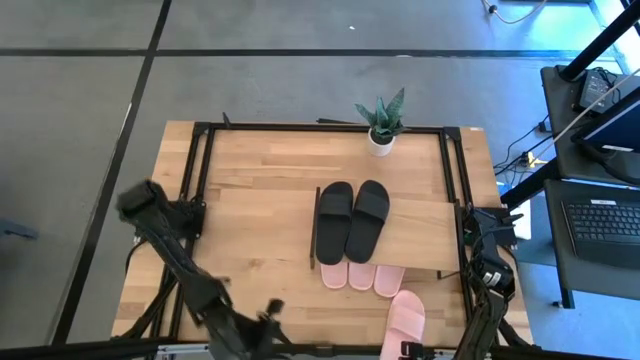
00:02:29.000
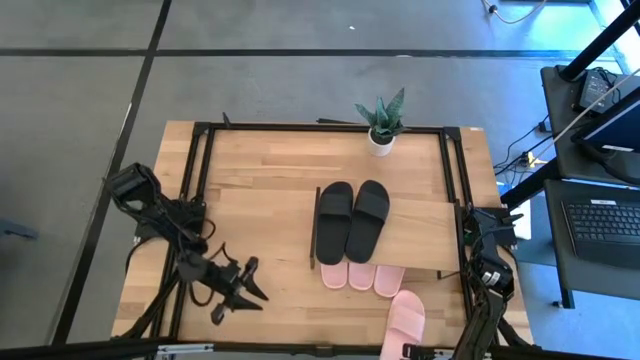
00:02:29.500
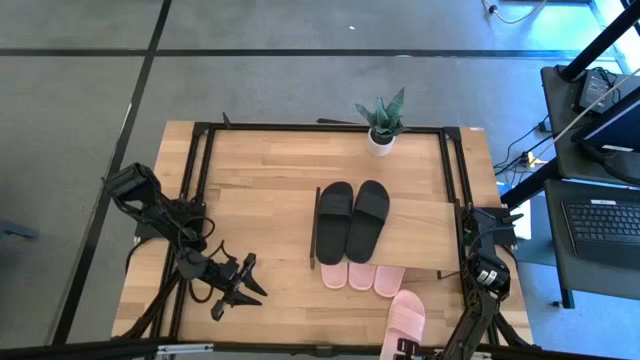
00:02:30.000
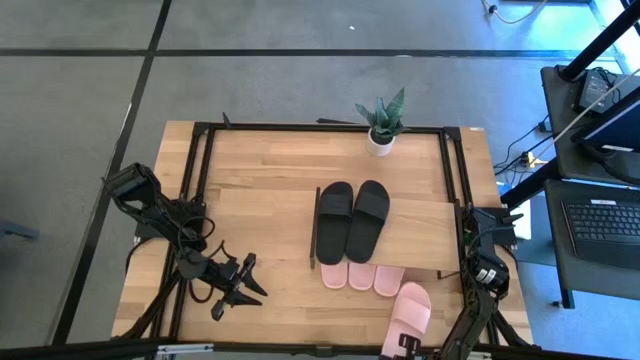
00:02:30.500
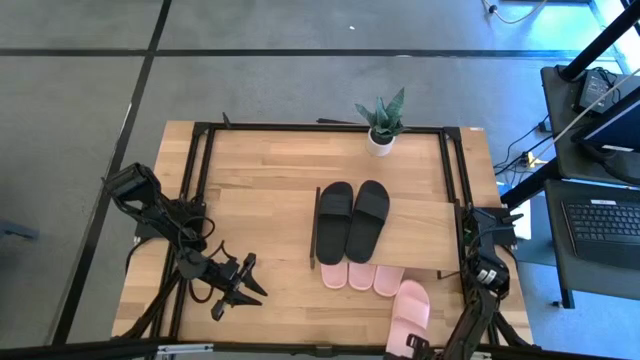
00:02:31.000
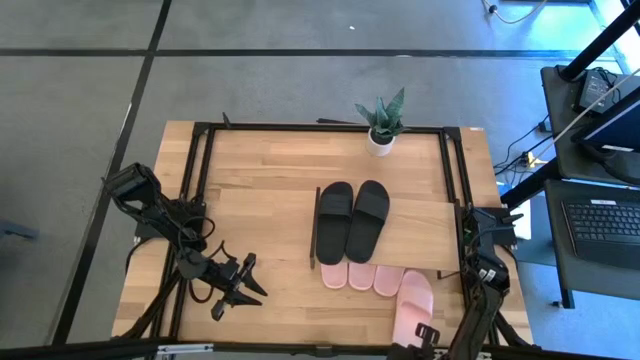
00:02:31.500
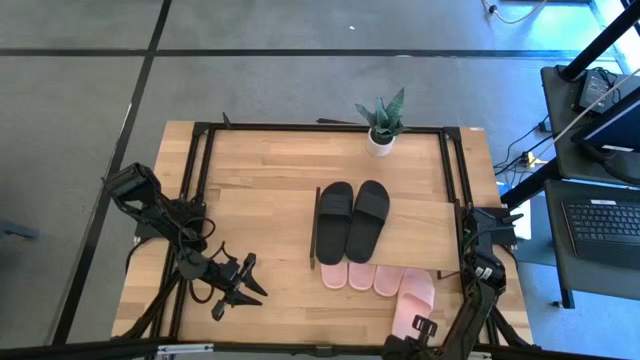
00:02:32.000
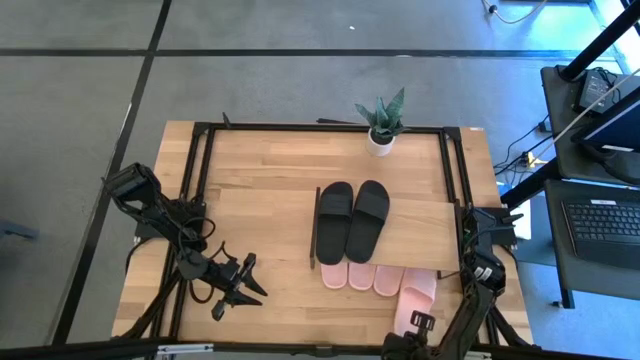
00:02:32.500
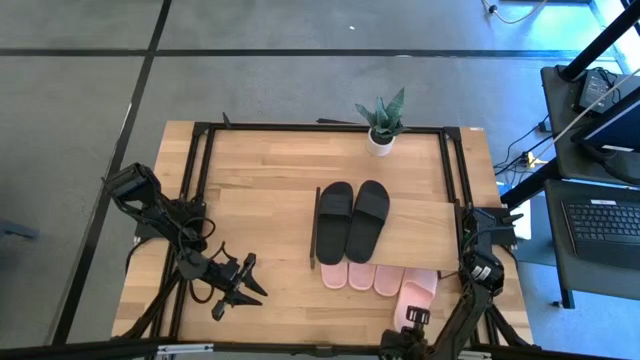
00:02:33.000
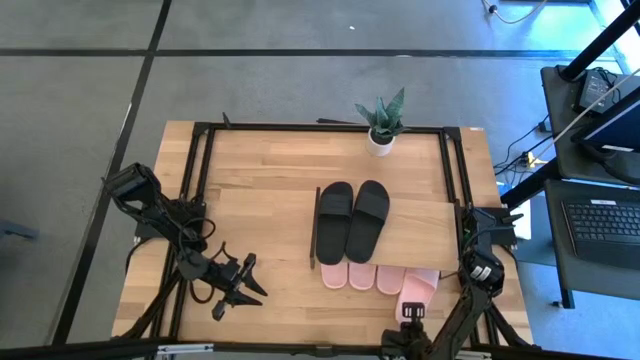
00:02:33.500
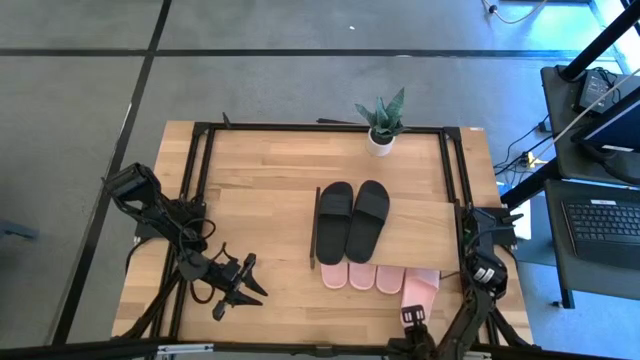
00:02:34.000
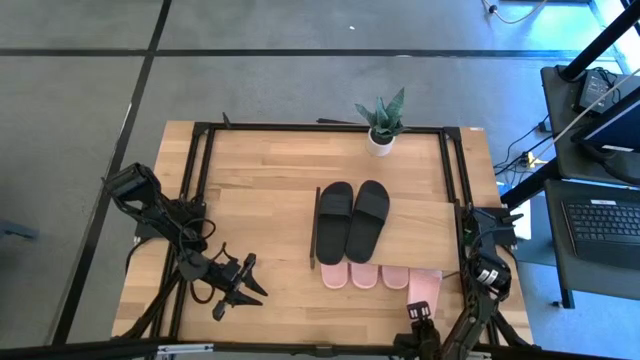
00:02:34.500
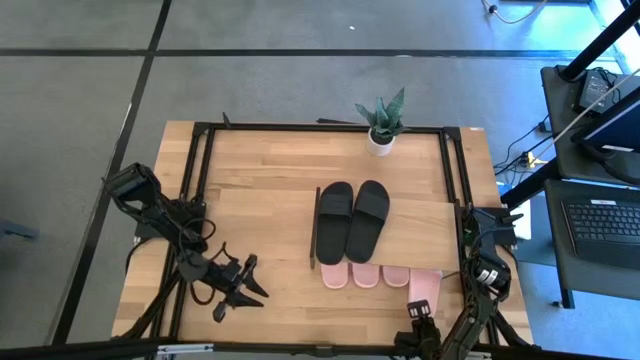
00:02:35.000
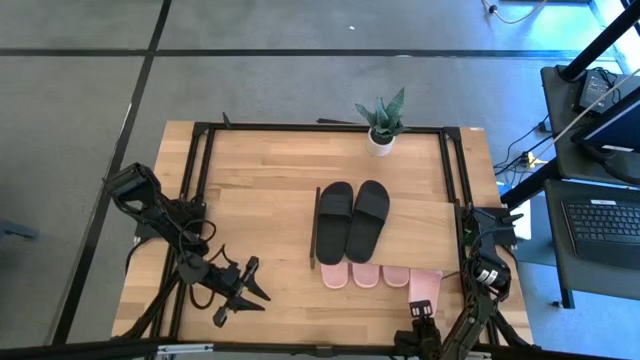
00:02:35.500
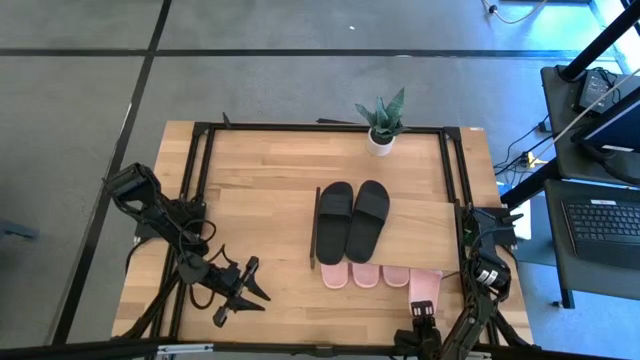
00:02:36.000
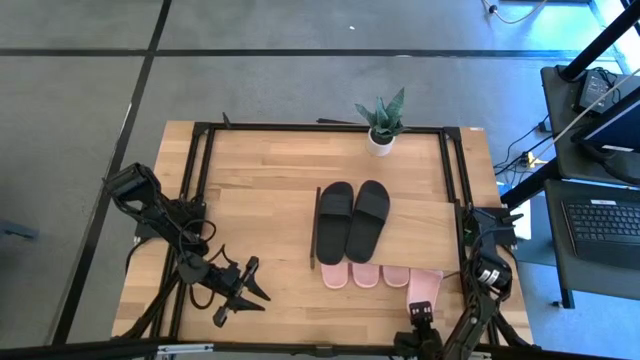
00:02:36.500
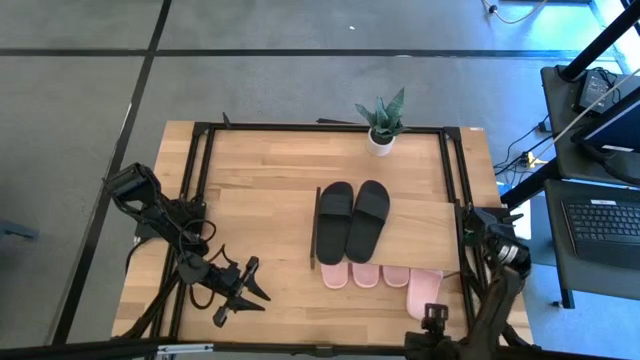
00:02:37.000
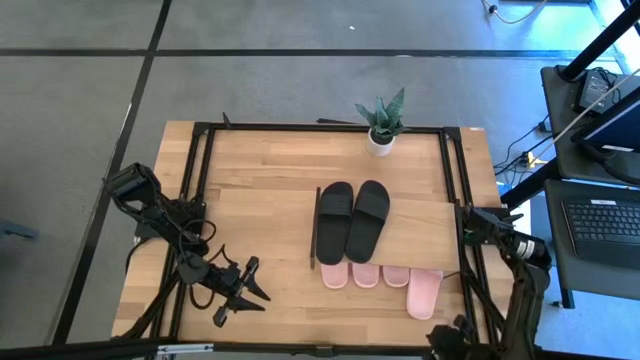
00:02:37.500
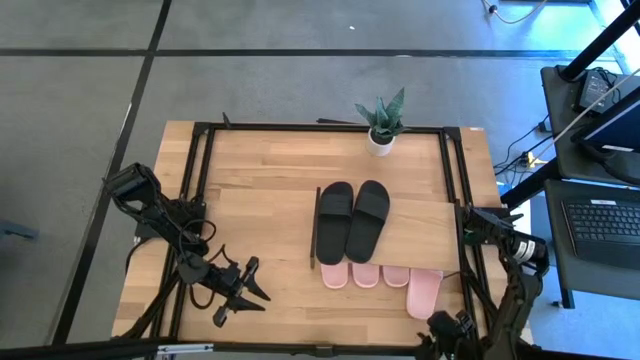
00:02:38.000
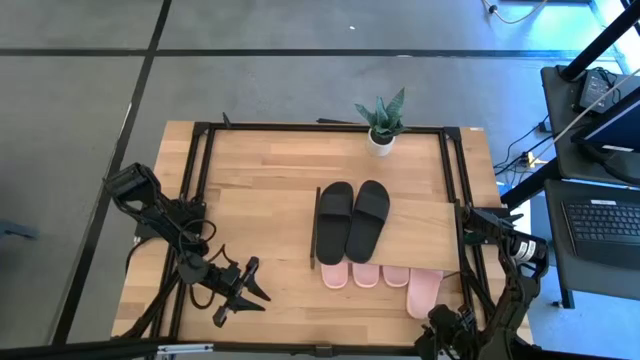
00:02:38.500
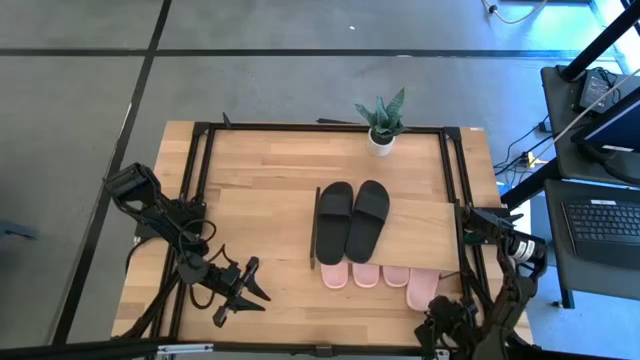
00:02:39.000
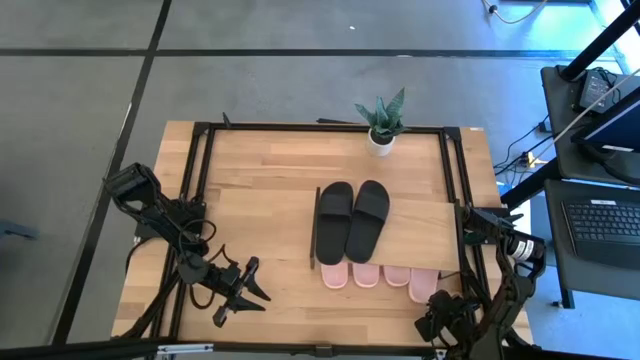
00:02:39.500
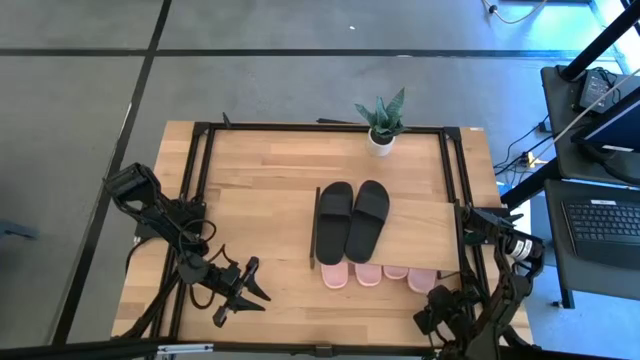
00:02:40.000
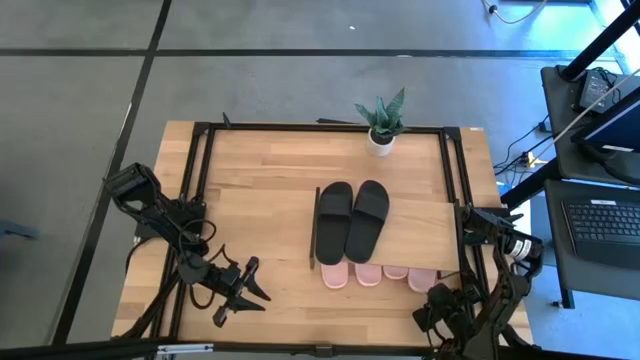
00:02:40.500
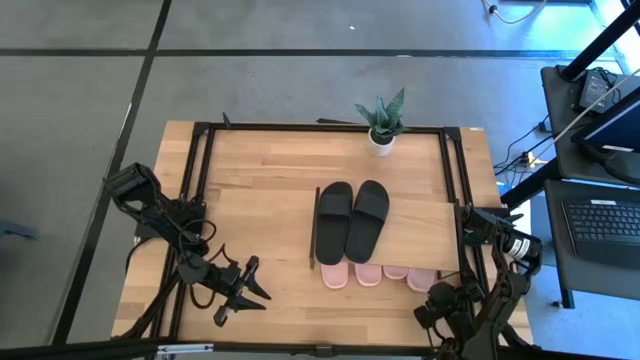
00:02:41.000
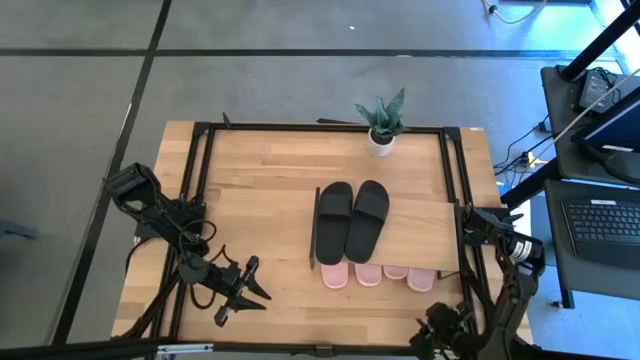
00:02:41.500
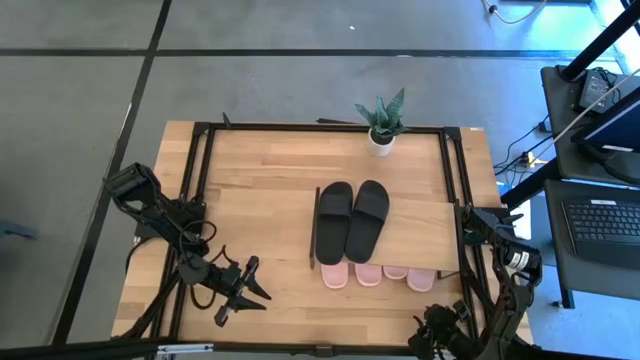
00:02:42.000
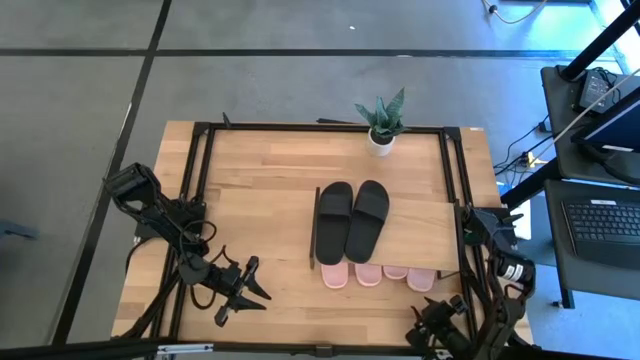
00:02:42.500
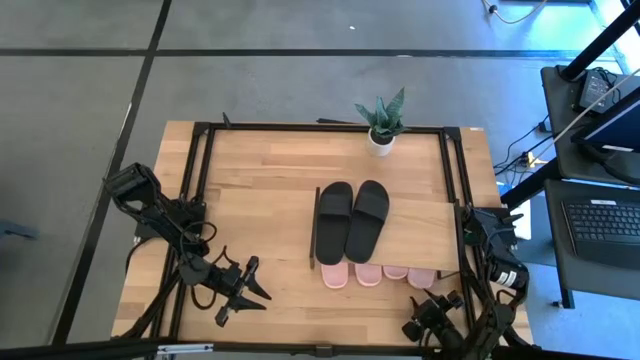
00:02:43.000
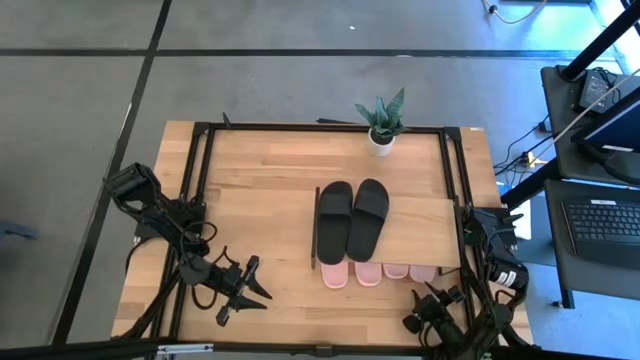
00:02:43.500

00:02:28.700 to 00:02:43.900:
Task: Pick and place slides into the shelf
Put the pink slipper under the shelf

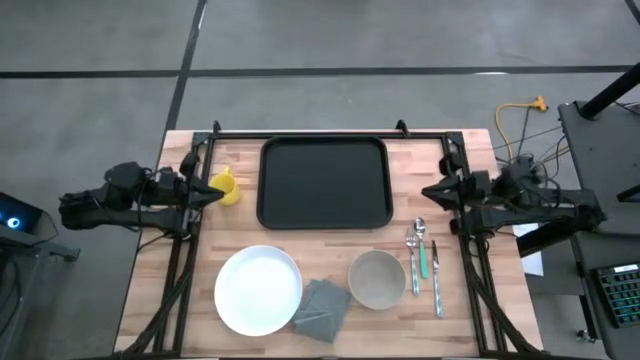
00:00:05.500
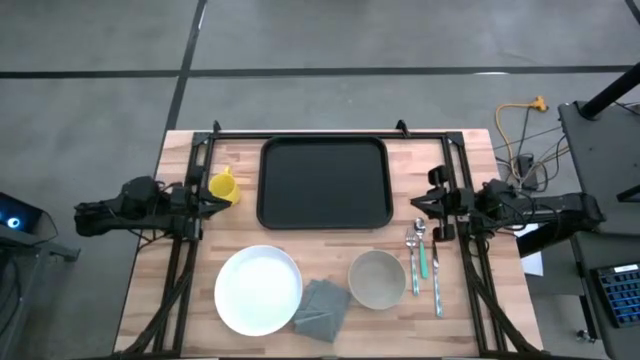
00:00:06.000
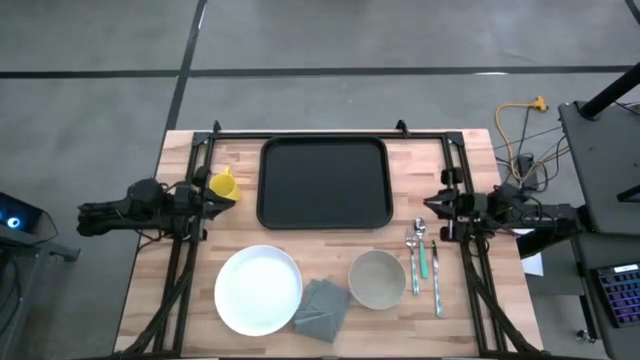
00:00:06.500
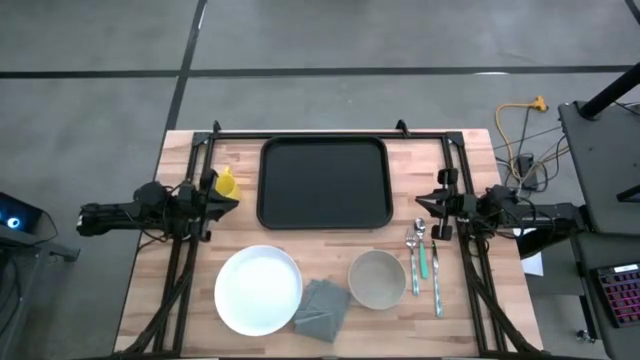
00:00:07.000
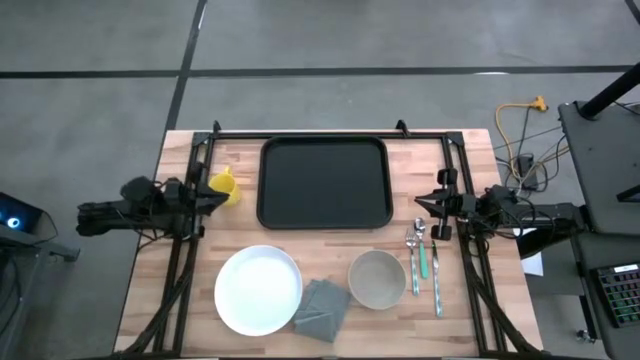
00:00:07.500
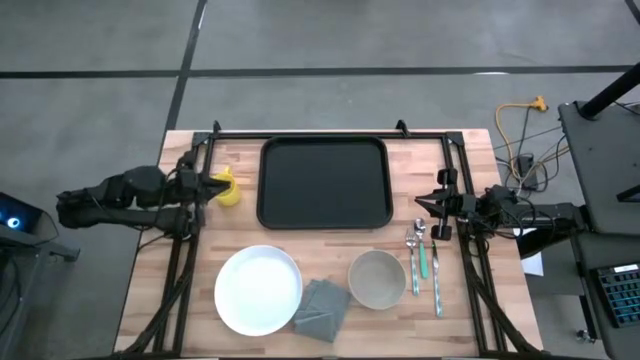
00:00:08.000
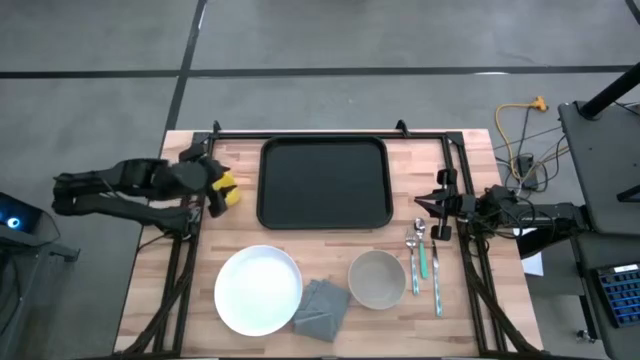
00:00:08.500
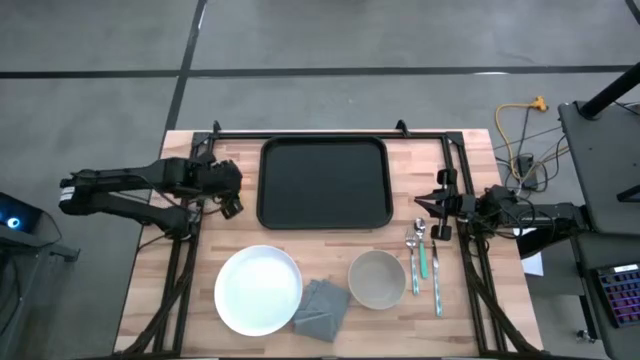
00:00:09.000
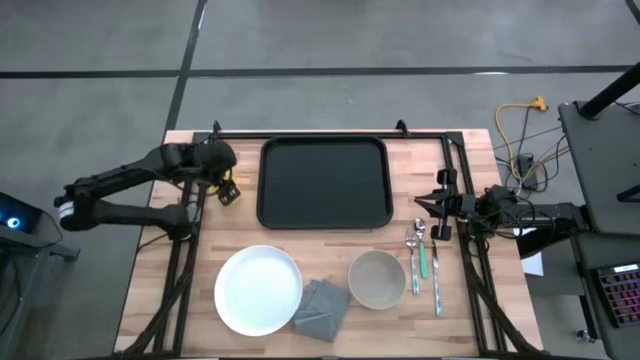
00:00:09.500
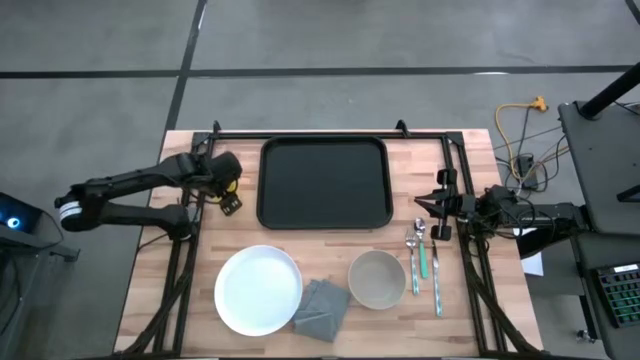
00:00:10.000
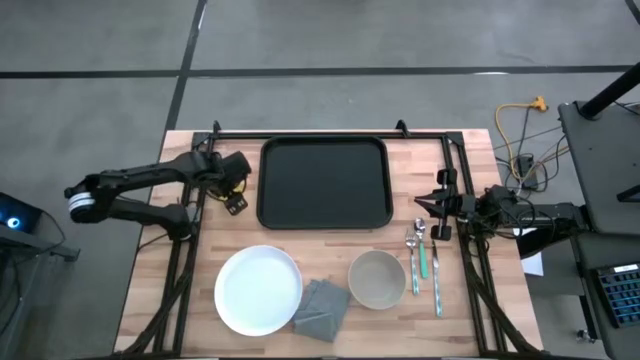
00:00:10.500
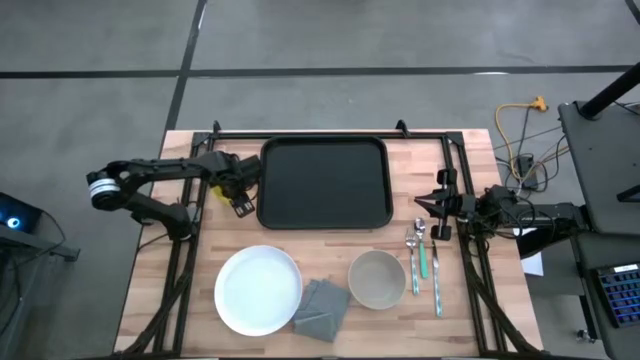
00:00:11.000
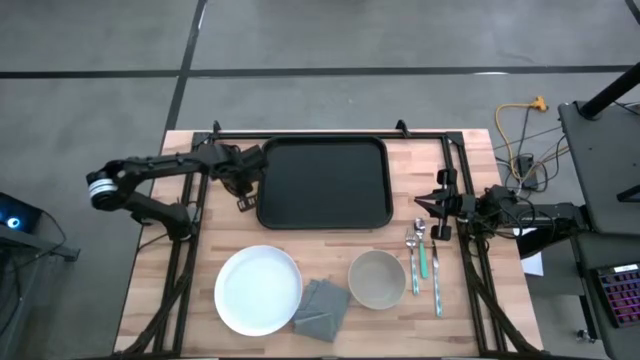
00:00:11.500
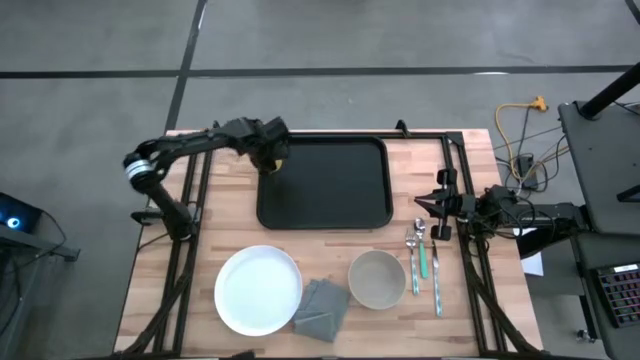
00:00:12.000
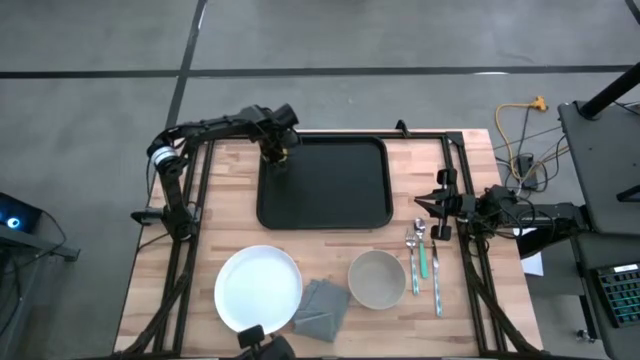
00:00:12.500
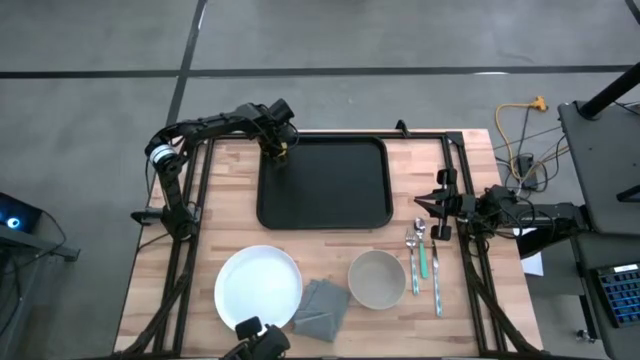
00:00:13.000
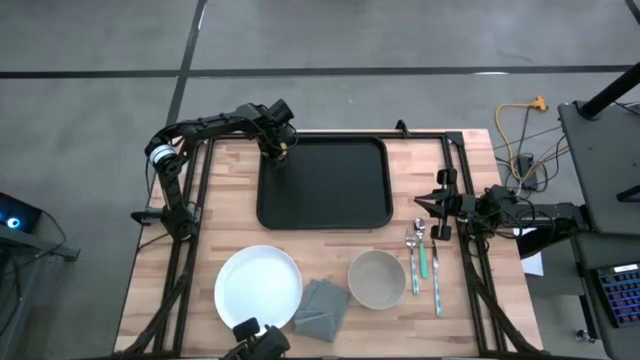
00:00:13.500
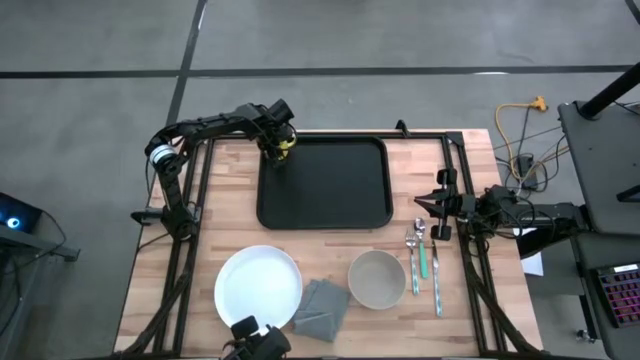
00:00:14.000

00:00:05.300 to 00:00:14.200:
Task: Set up tray
Put the yellow cup on the black serving tray
